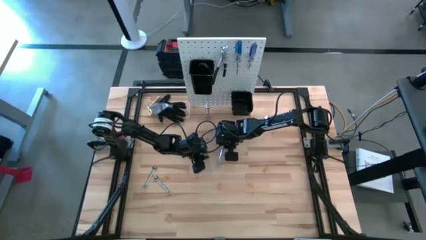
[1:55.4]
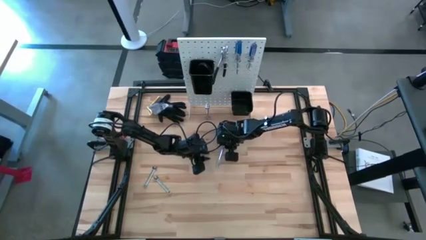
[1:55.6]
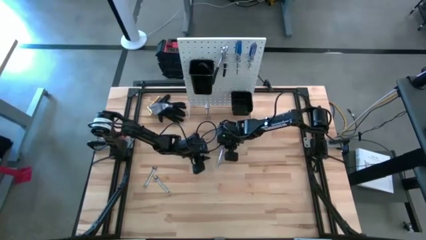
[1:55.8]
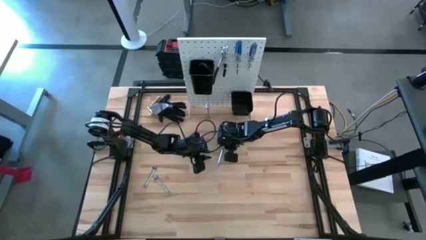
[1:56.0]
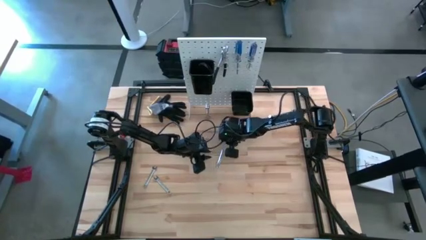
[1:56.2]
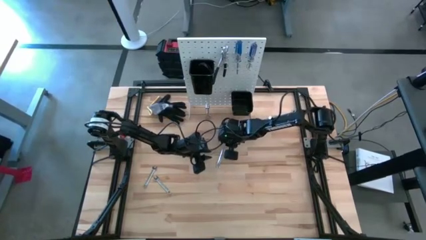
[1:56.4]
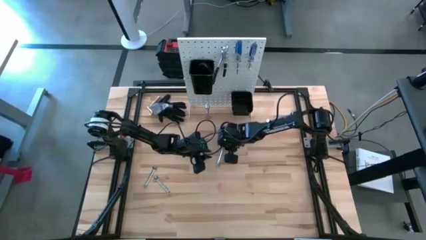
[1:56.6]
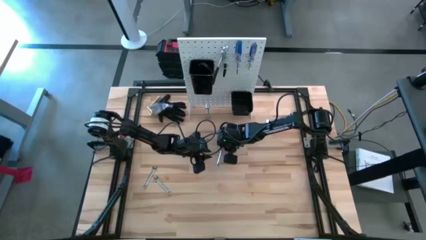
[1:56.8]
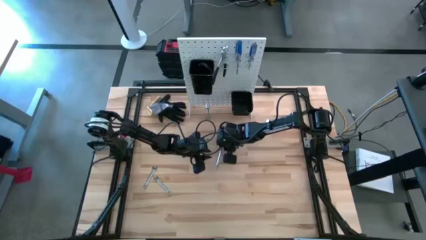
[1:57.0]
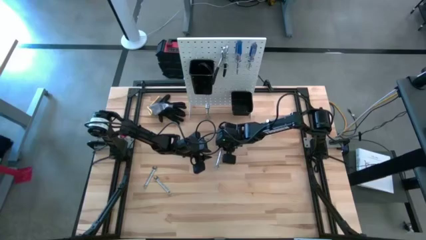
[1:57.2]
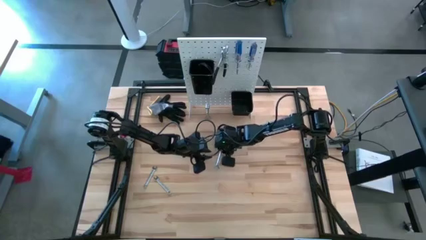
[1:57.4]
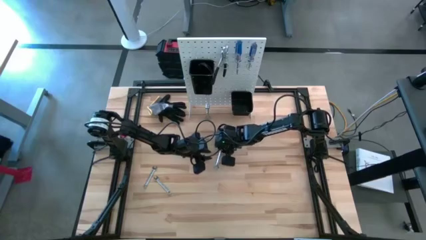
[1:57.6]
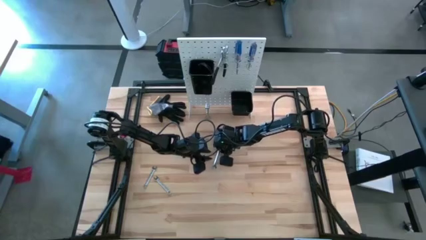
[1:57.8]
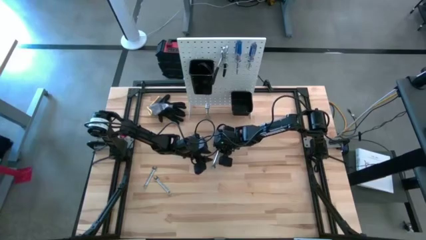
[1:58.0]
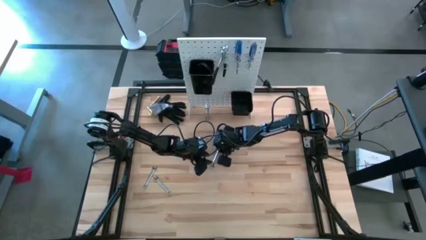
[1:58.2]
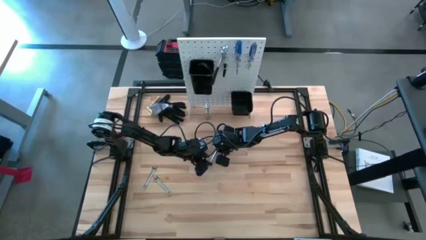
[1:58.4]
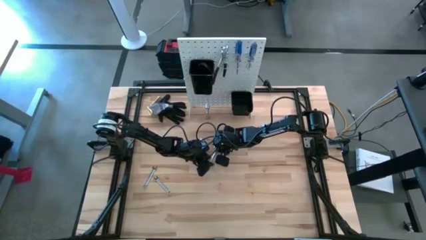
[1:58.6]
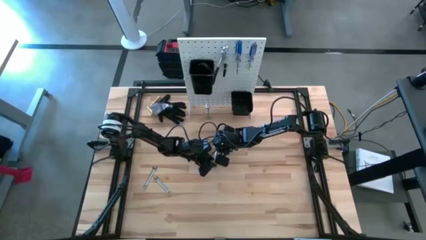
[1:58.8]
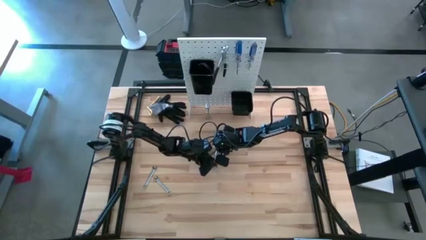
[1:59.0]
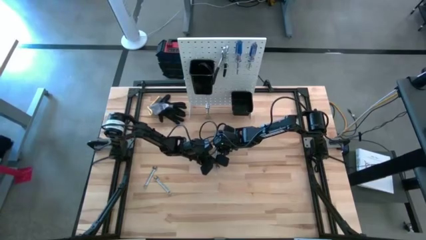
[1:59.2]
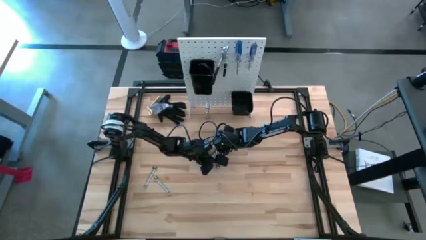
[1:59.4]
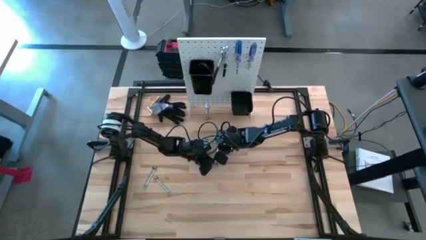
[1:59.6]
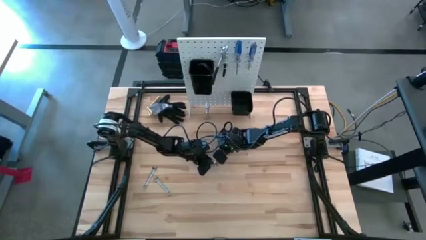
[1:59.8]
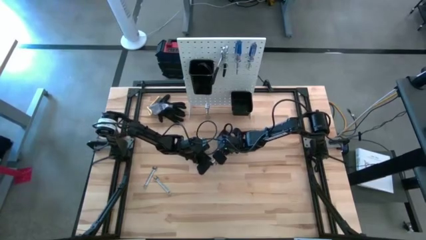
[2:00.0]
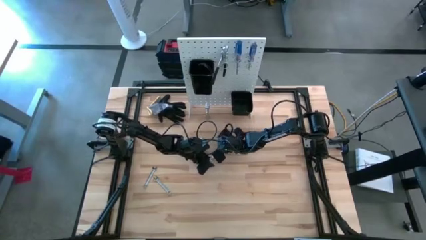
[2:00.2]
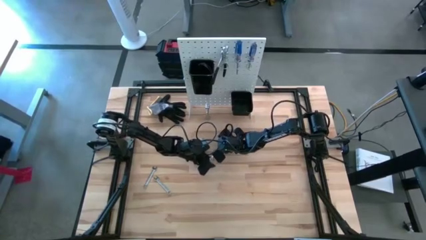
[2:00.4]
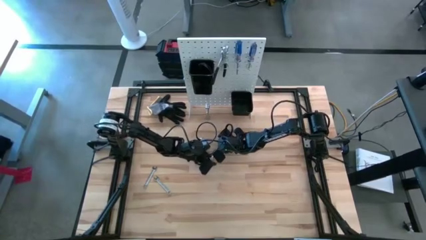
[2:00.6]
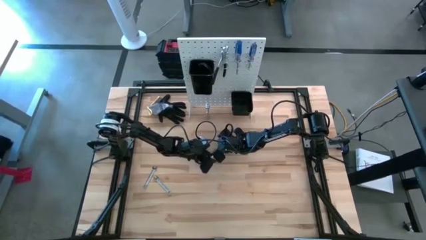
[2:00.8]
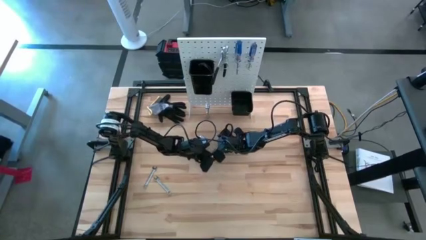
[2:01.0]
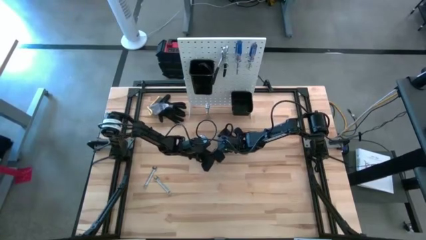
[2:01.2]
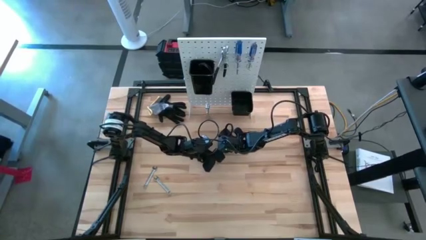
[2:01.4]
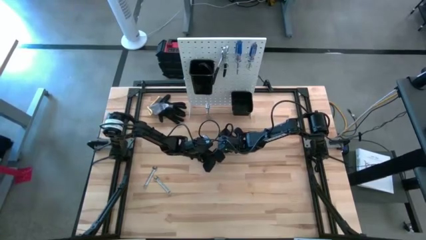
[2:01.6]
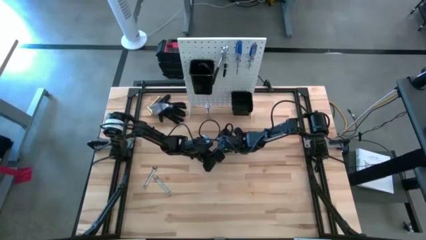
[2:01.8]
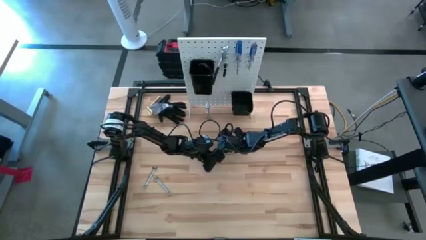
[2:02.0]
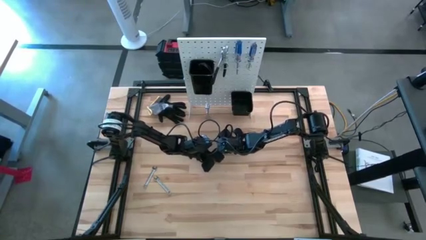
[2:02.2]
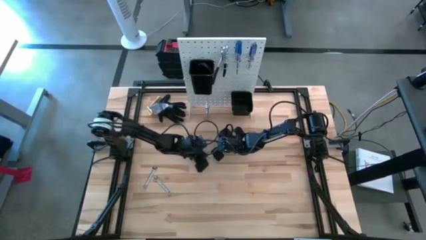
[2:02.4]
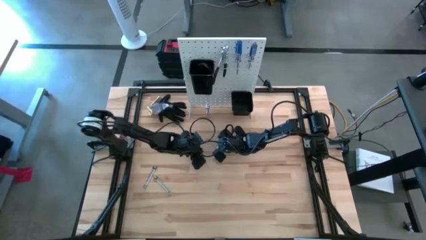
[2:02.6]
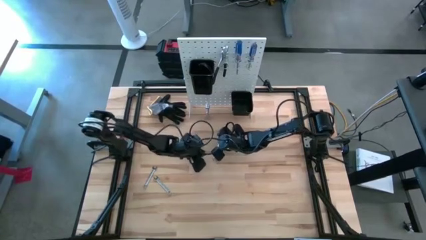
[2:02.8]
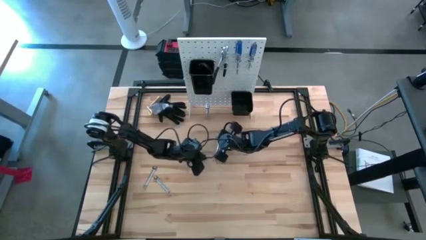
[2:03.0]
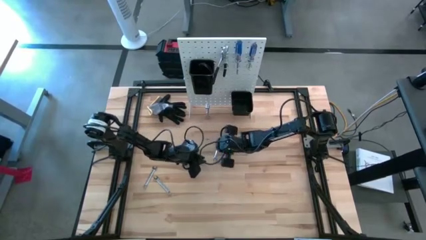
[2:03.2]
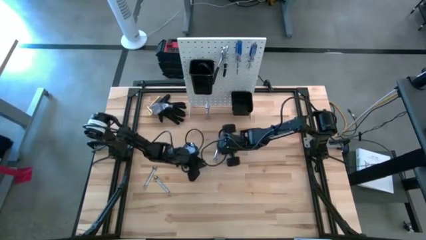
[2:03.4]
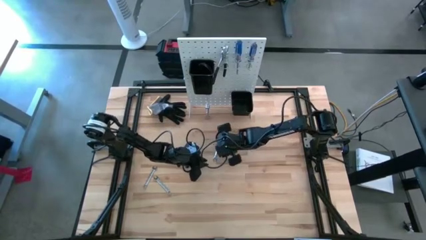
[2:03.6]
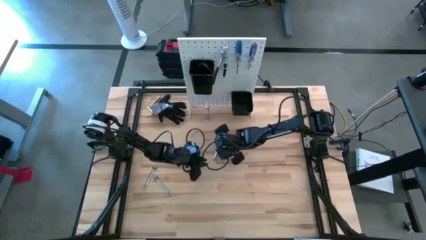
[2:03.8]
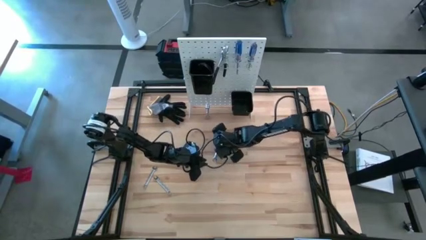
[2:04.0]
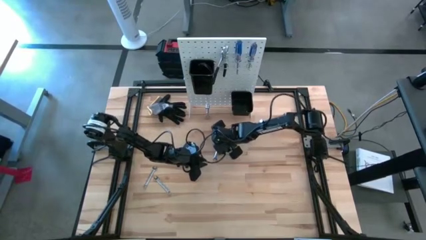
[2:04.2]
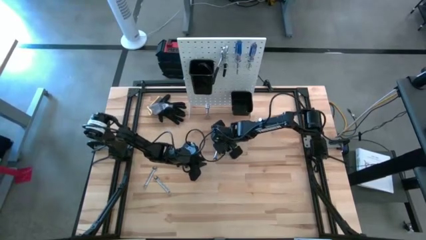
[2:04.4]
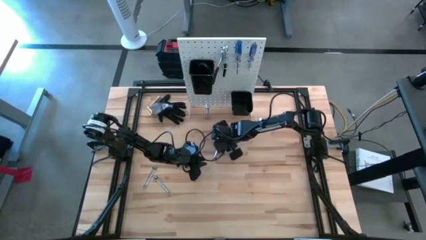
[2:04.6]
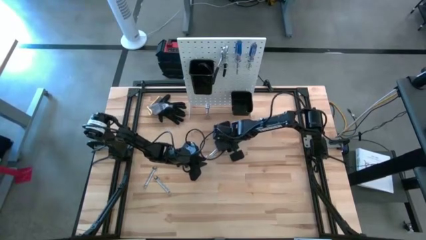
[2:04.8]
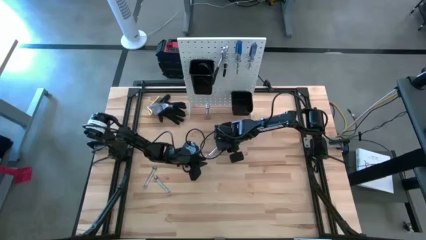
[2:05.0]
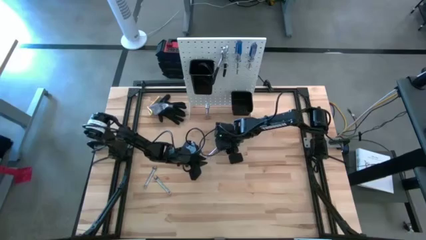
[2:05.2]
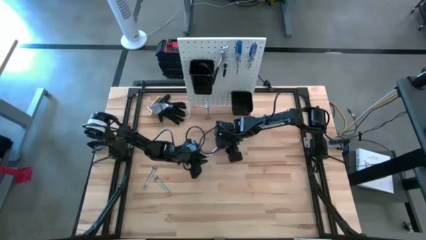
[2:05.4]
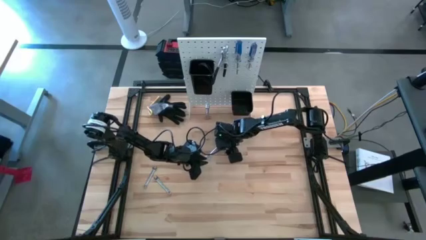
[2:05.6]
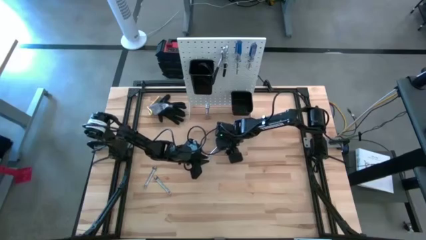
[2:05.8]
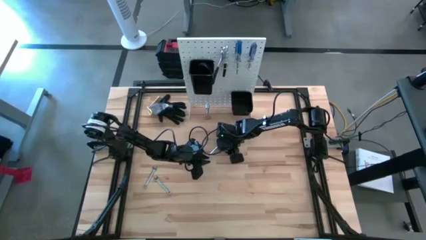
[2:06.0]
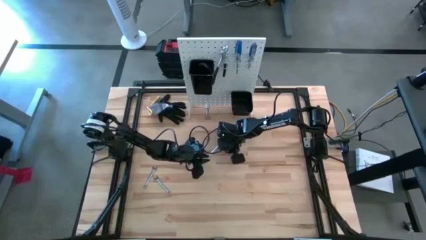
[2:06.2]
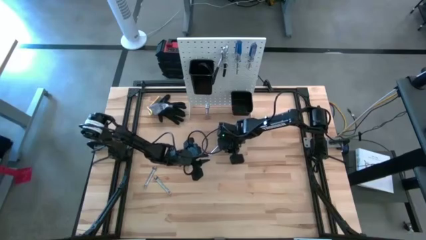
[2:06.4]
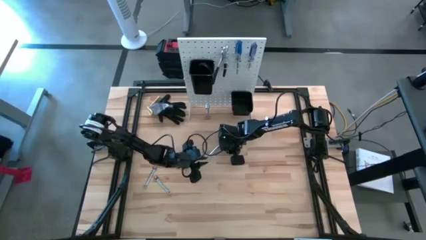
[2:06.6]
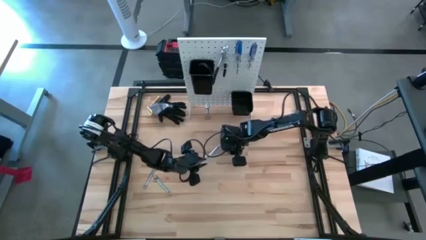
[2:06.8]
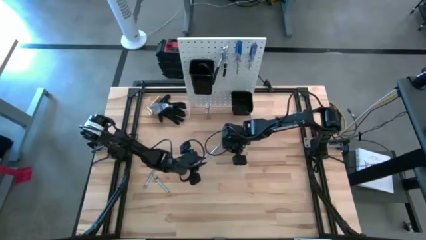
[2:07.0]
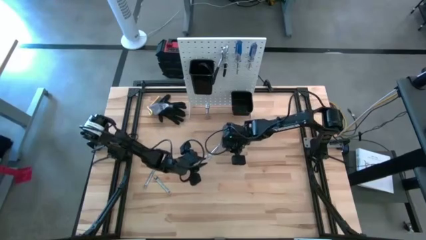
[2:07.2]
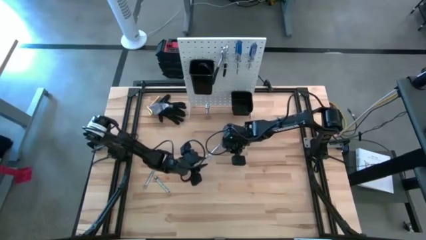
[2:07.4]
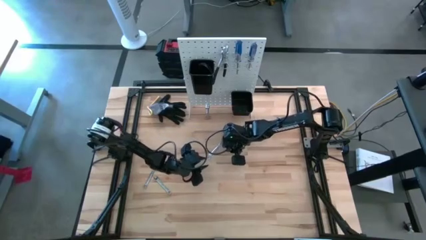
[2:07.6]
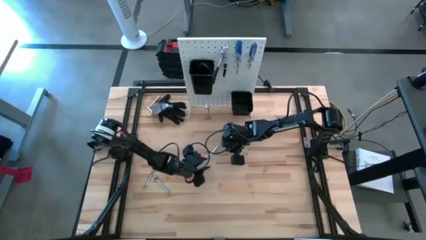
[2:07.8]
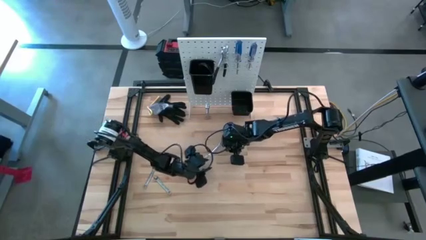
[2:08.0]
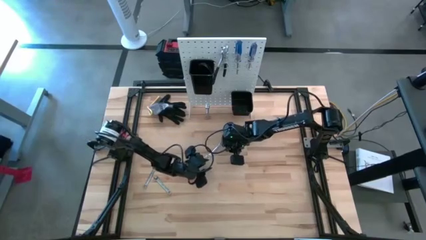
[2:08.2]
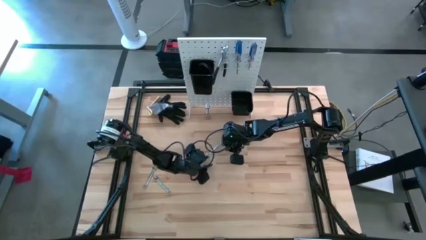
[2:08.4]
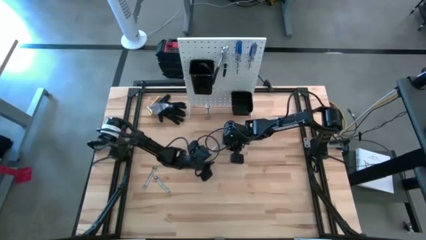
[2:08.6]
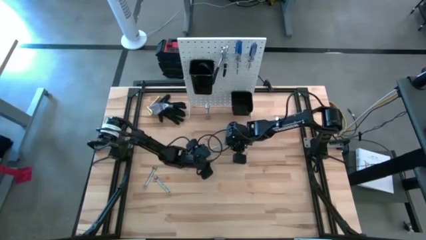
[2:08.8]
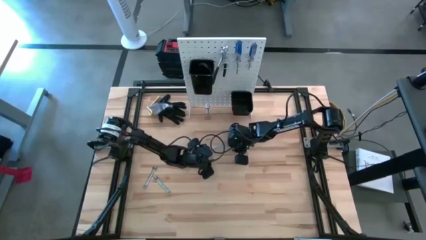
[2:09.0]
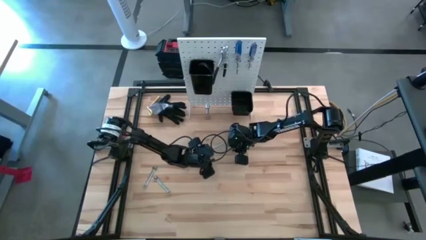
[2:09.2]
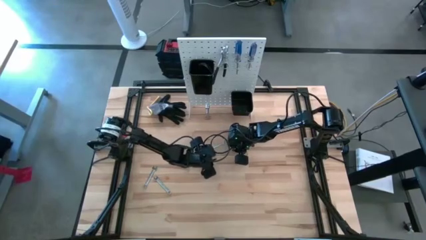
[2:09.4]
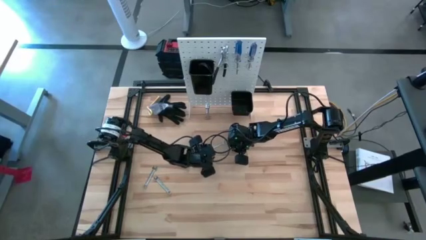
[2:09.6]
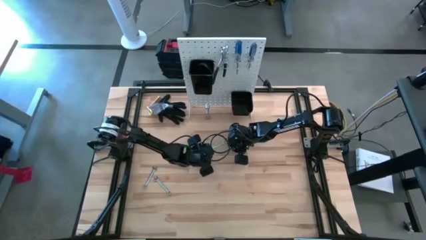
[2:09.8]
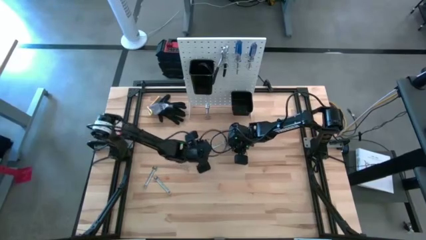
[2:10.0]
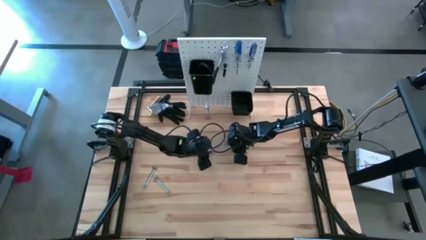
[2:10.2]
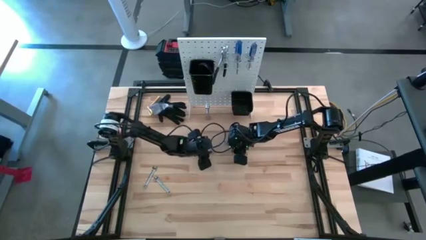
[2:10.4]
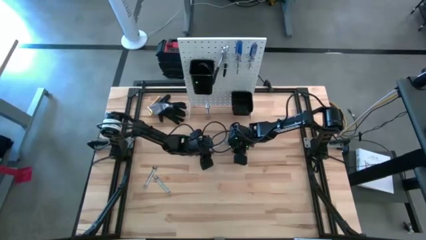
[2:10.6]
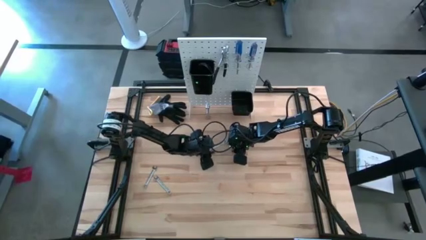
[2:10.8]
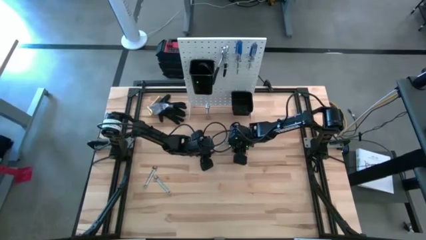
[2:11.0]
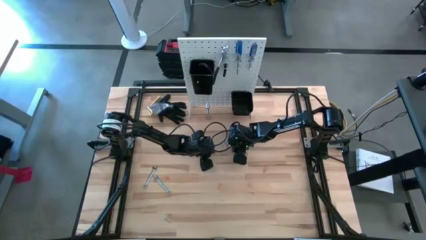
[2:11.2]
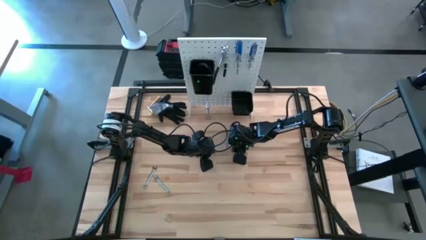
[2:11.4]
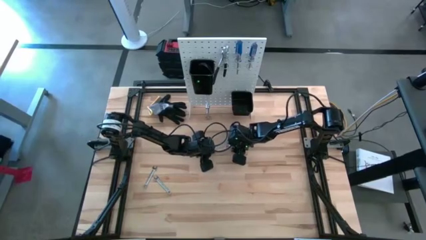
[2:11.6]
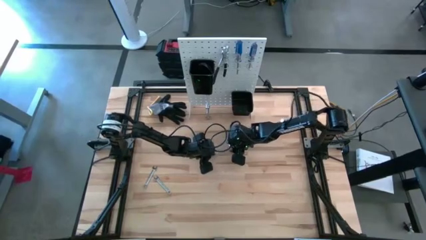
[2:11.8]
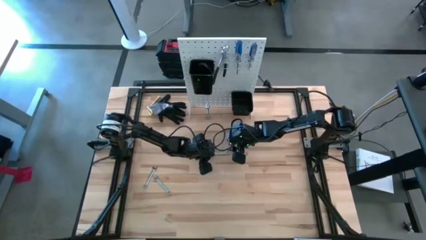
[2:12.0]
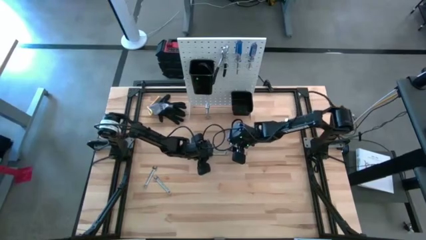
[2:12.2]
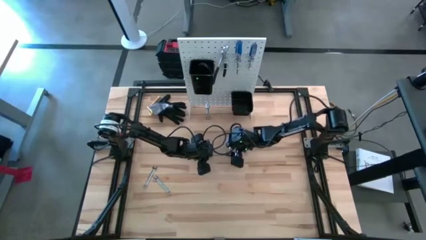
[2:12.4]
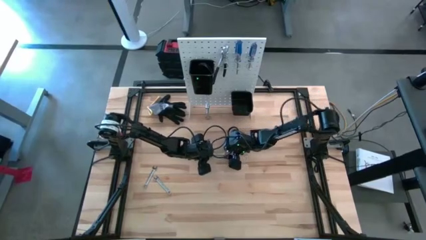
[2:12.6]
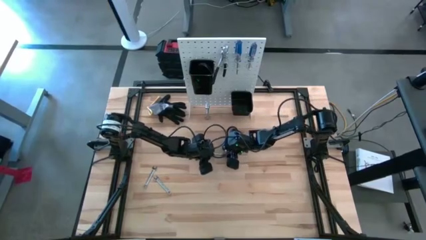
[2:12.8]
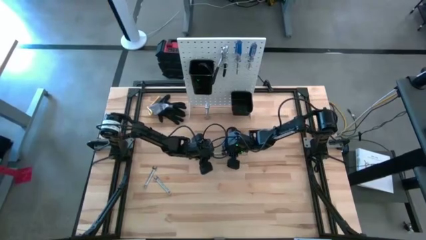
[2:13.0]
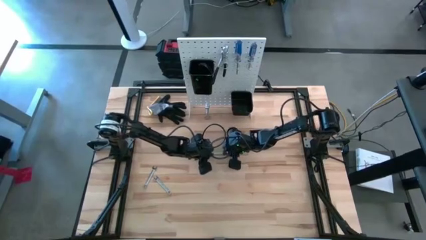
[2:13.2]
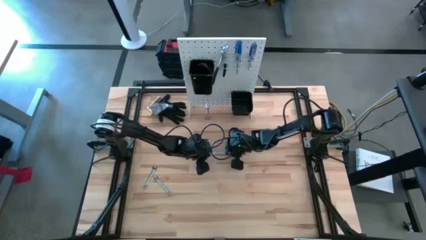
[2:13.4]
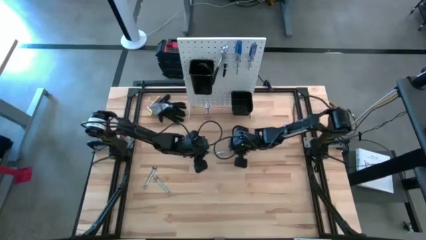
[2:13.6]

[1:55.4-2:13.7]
Task: Hang tools onto peg board
Hang the wrench on the peg board
